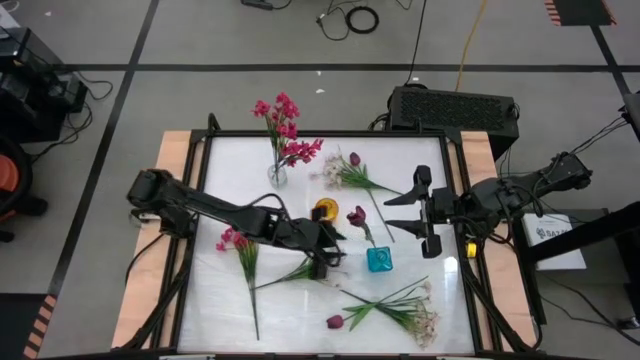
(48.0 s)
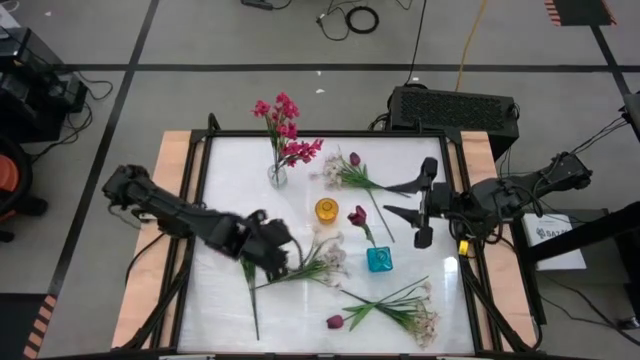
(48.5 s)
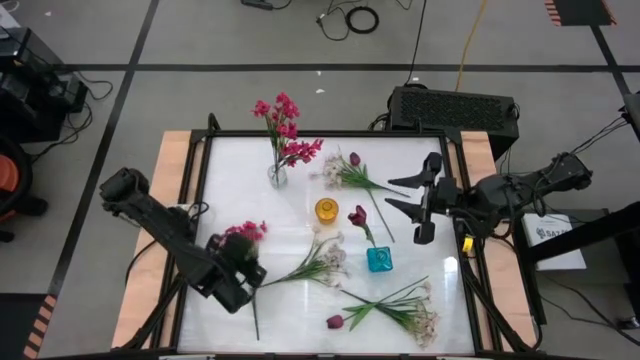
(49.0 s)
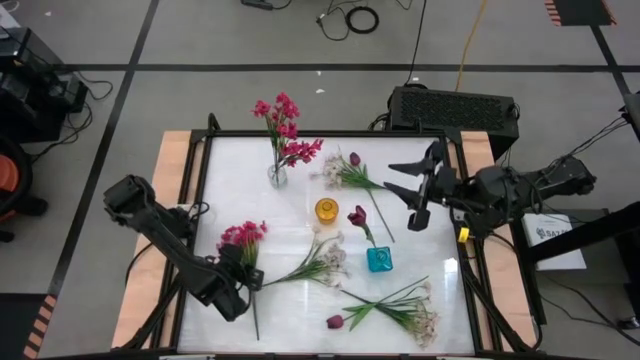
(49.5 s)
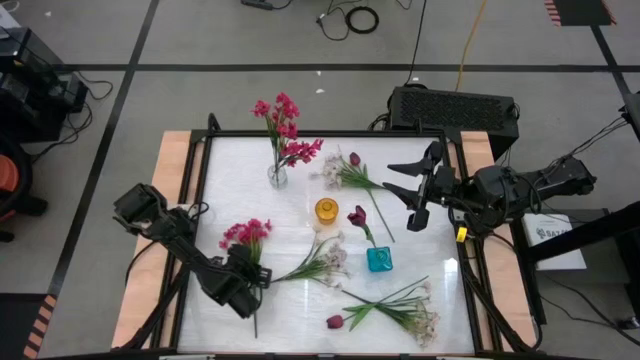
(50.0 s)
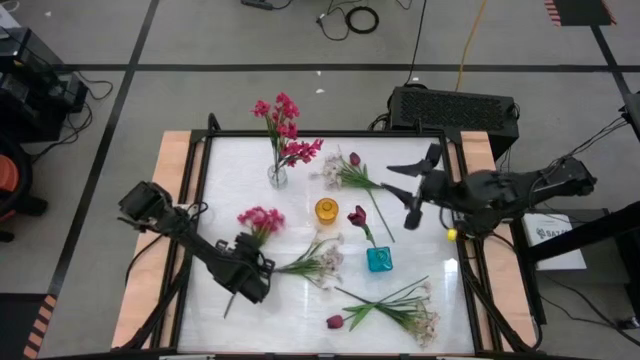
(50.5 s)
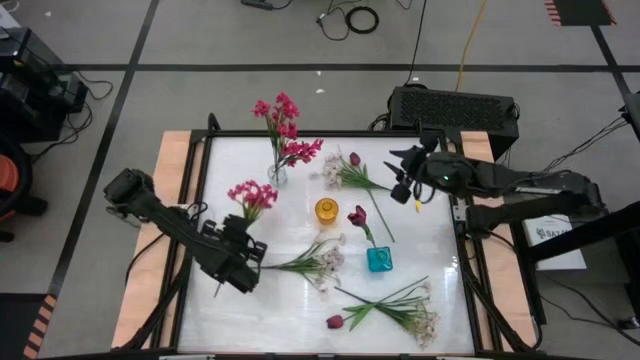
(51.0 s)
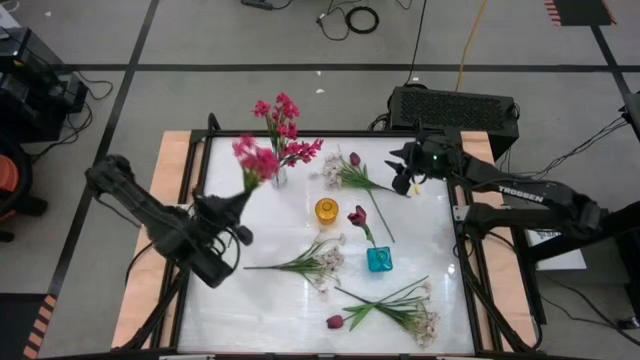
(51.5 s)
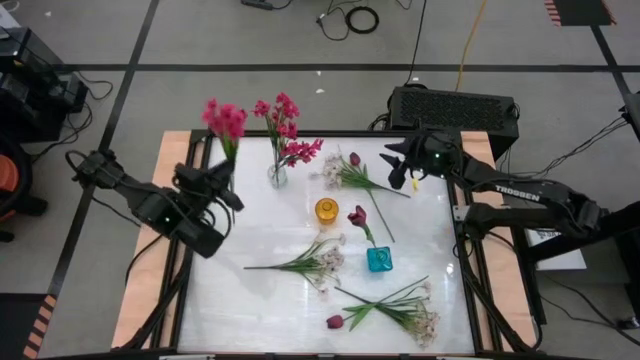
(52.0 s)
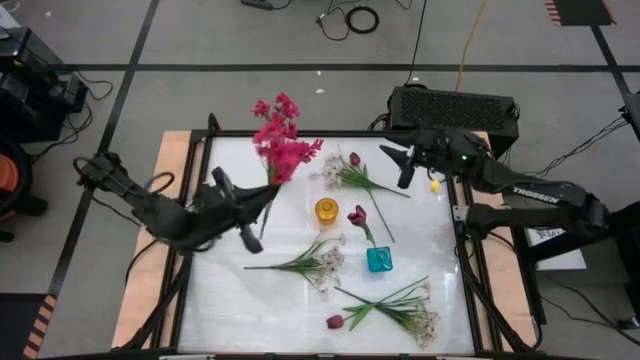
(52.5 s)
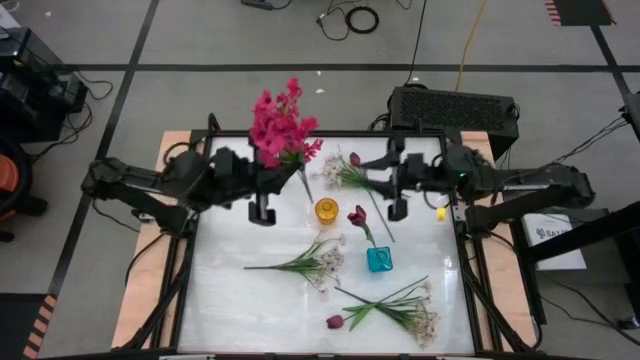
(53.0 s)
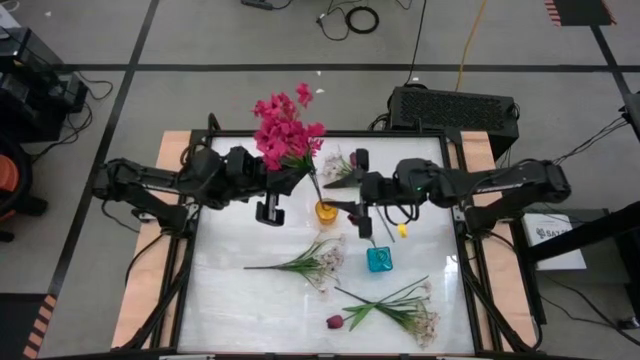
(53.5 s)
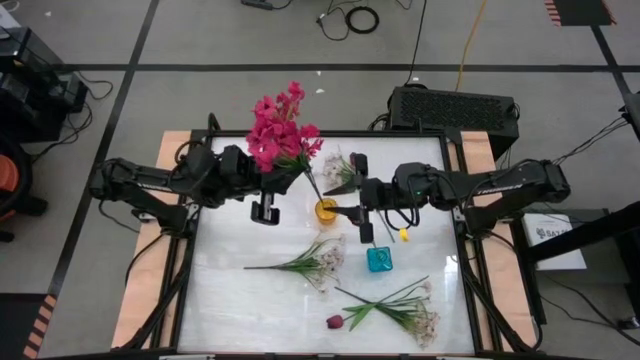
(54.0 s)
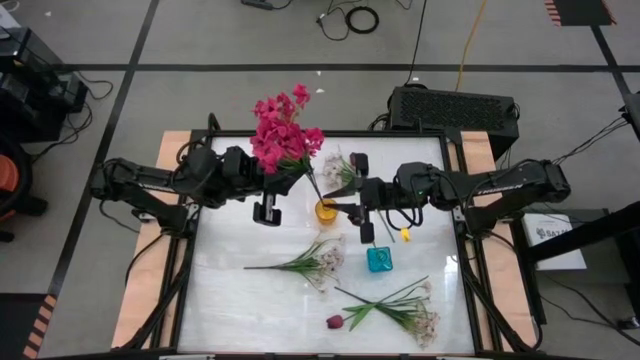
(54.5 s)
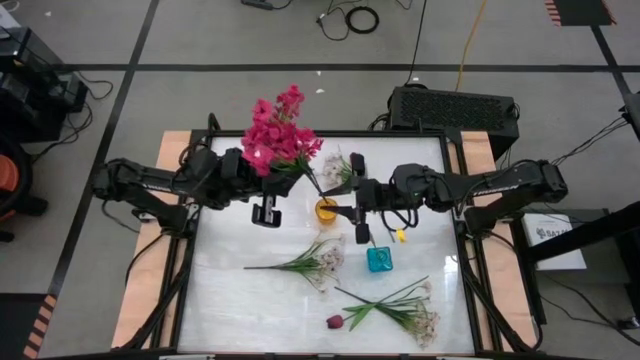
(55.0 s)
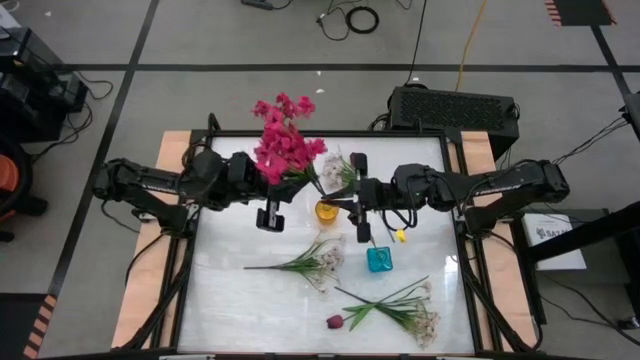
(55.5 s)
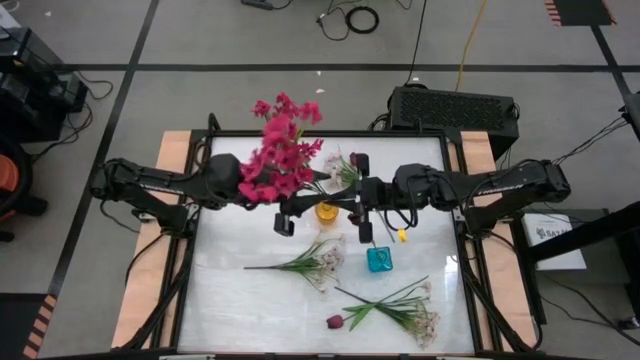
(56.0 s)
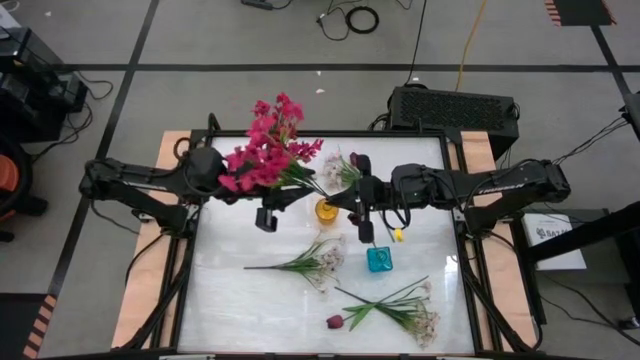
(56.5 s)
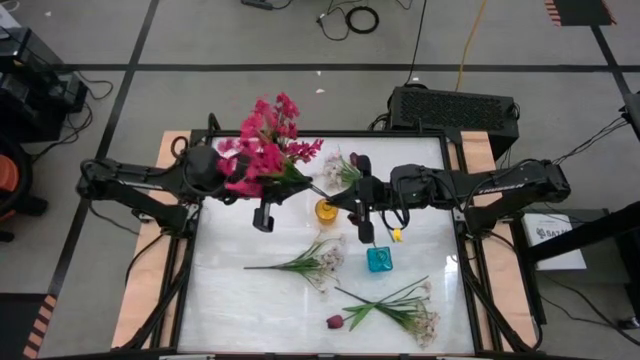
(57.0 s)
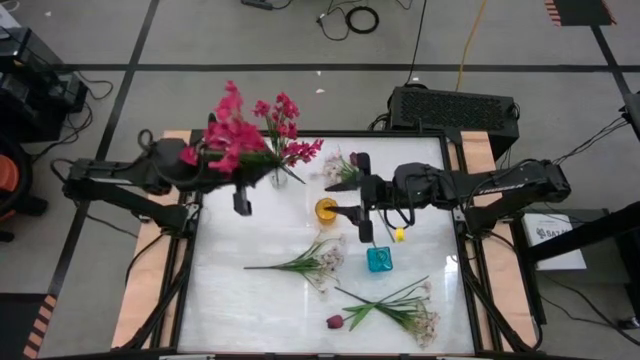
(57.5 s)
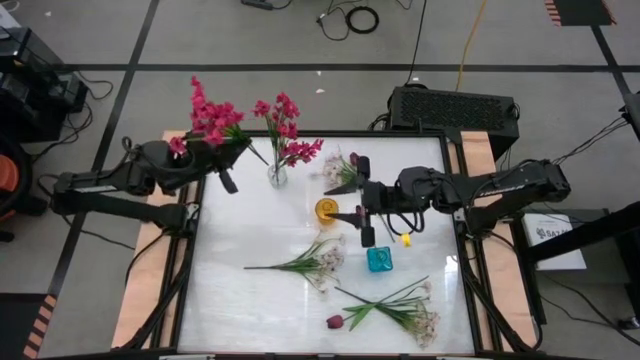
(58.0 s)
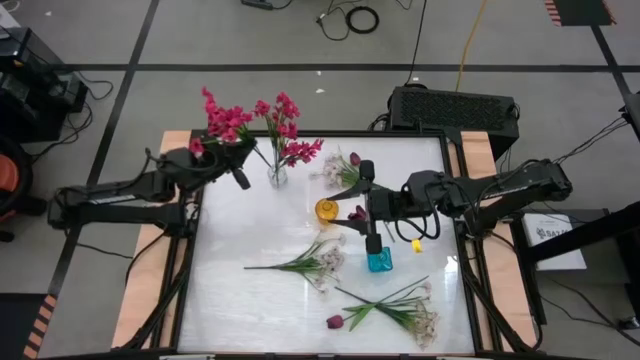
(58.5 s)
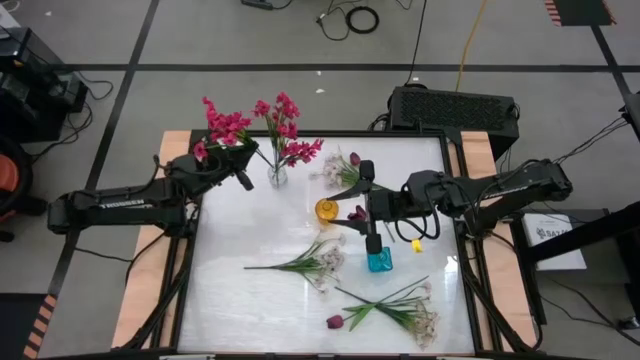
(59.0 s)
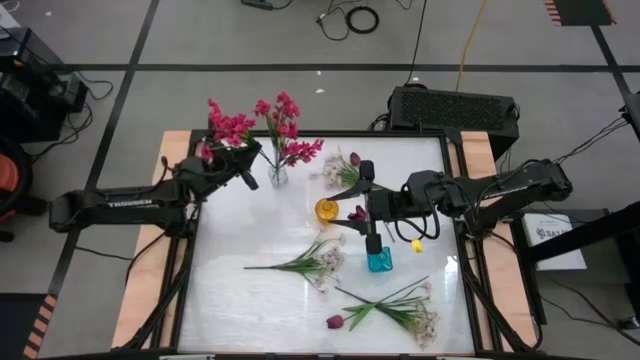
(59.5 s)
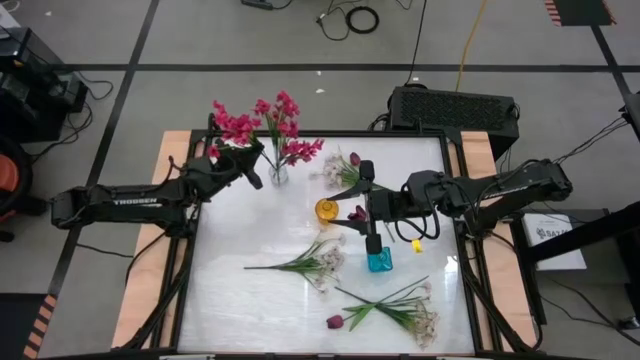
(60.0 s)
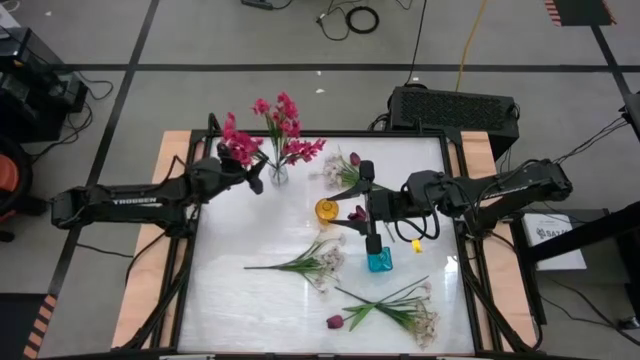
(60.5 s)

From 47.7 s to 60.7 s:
Task: Sort flowers into vase by color
Put the pink flower into the transparent vase

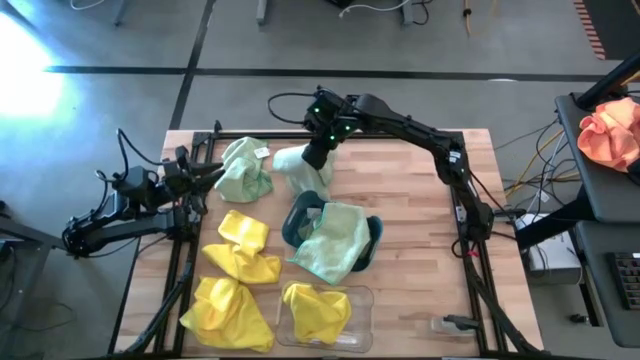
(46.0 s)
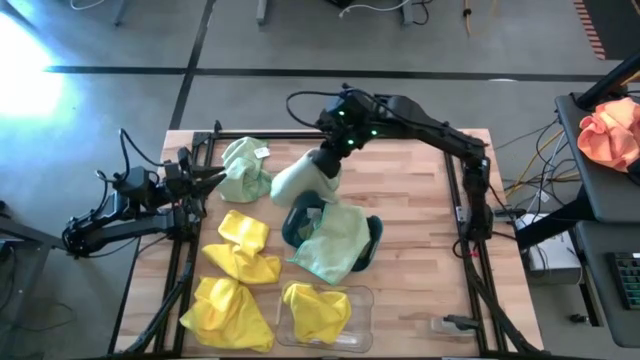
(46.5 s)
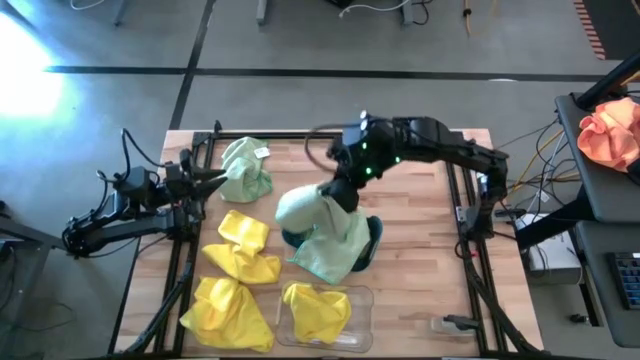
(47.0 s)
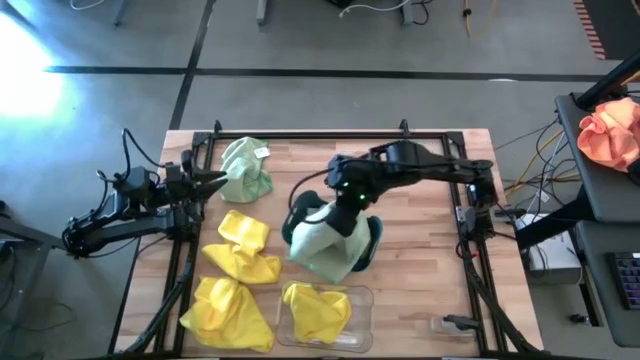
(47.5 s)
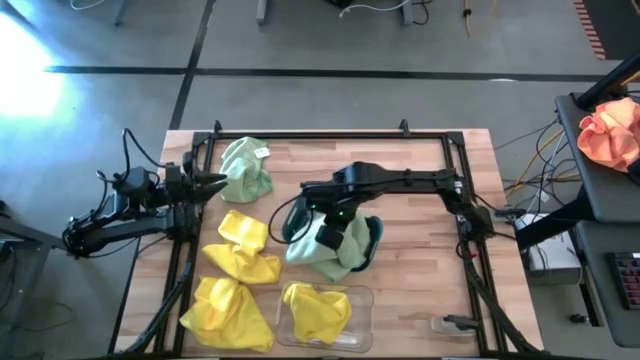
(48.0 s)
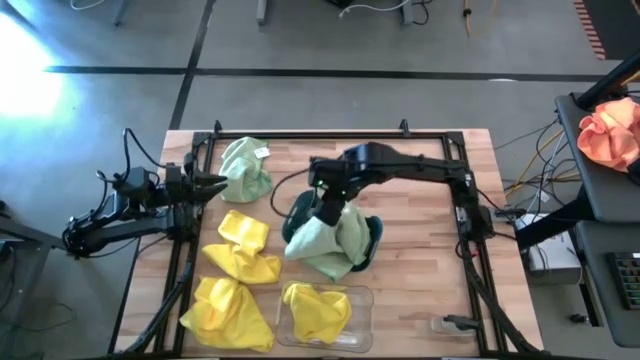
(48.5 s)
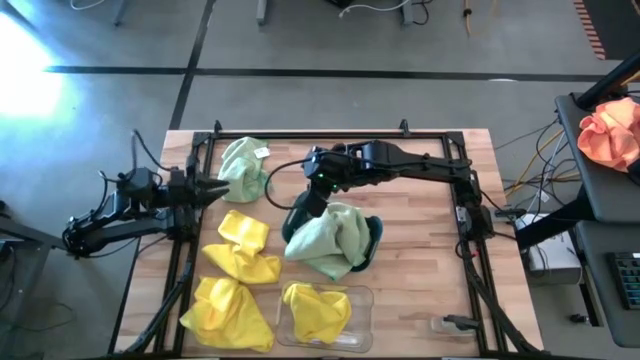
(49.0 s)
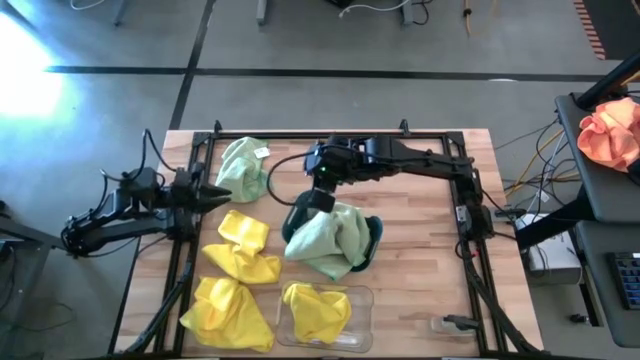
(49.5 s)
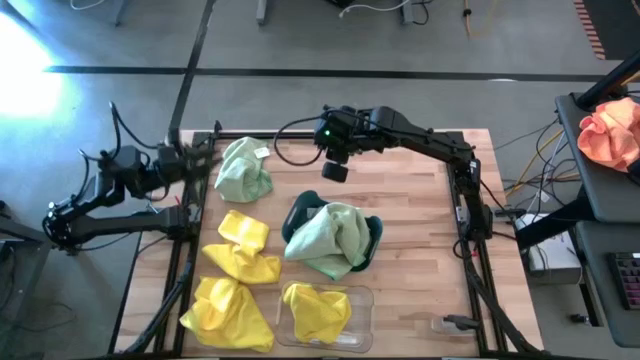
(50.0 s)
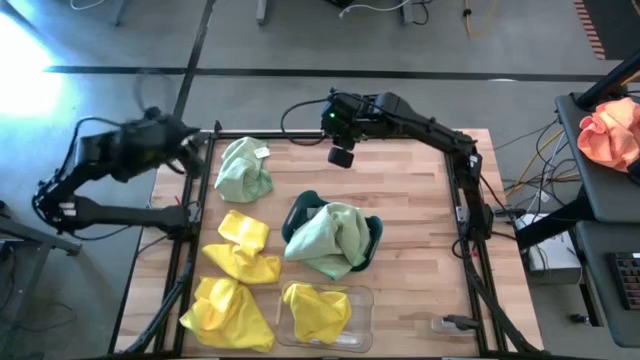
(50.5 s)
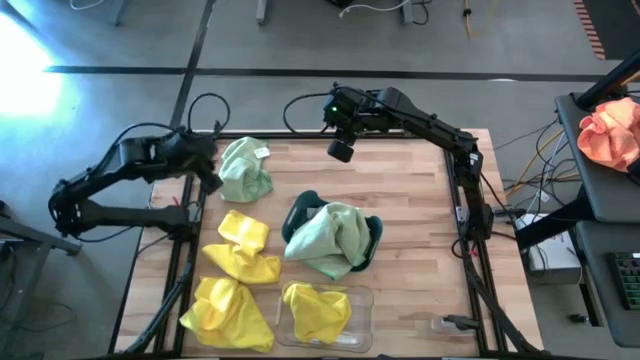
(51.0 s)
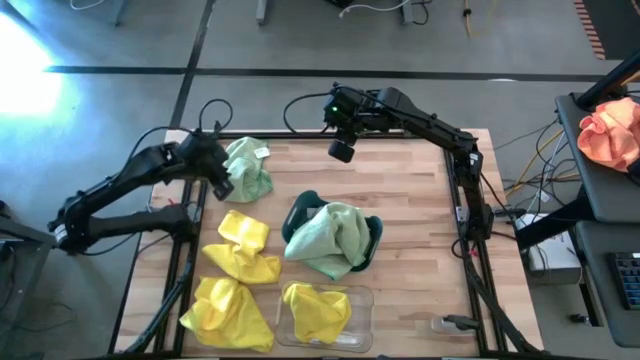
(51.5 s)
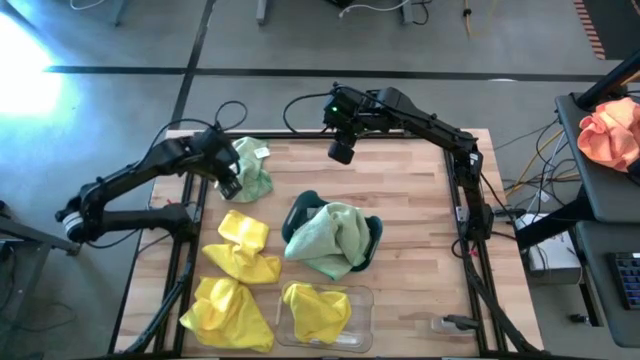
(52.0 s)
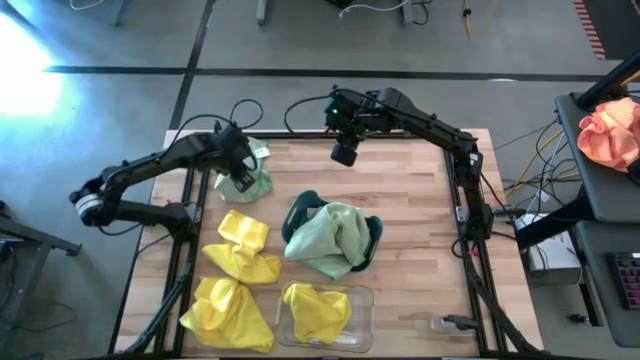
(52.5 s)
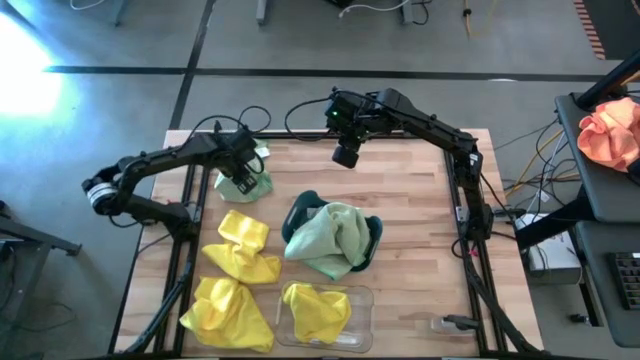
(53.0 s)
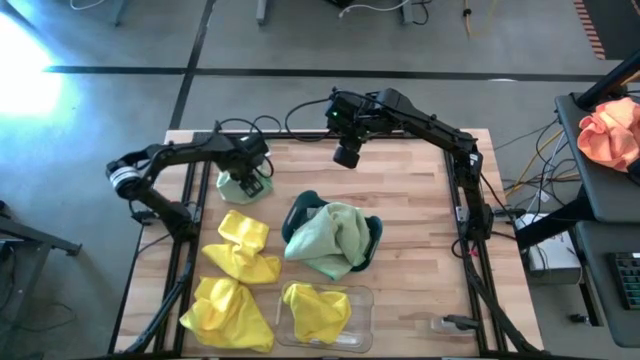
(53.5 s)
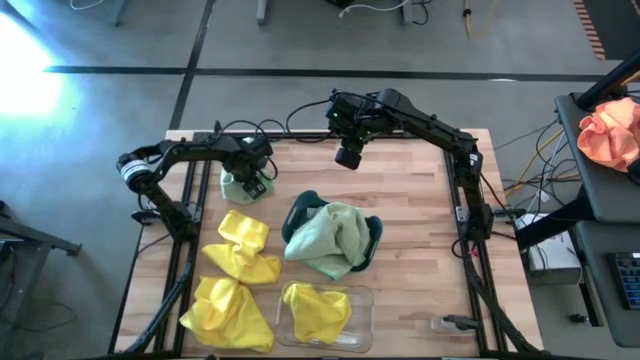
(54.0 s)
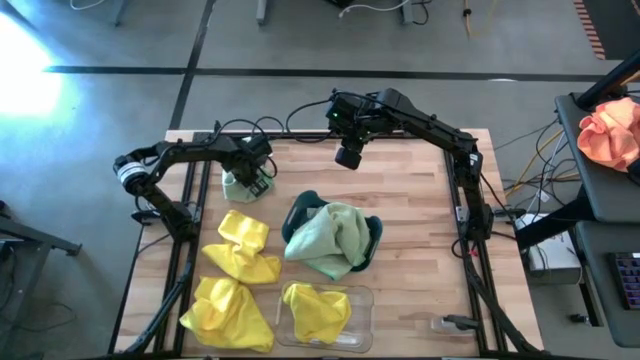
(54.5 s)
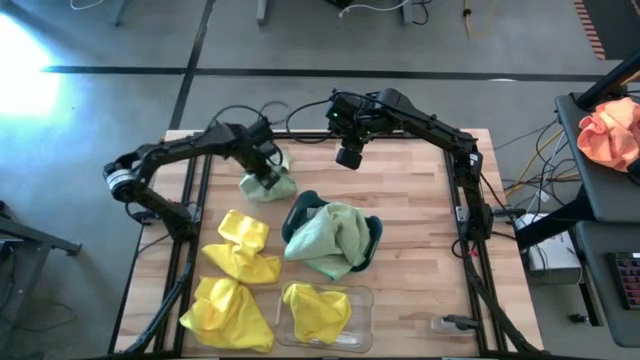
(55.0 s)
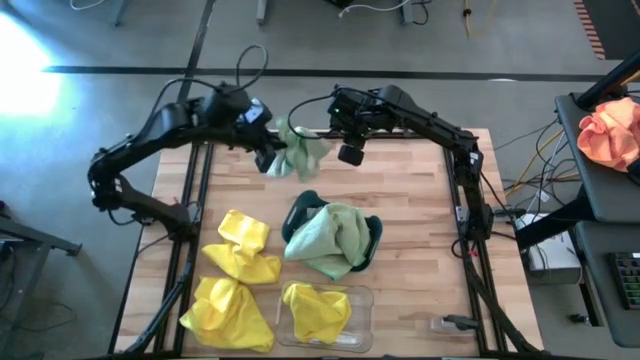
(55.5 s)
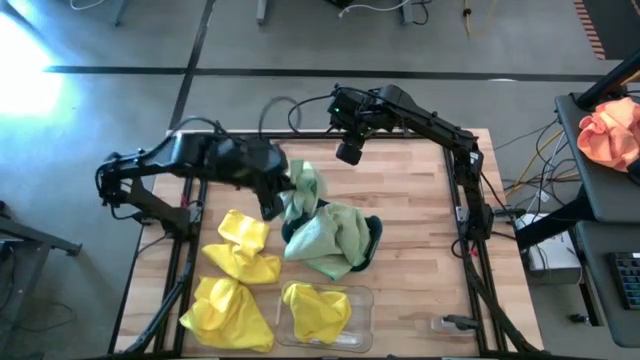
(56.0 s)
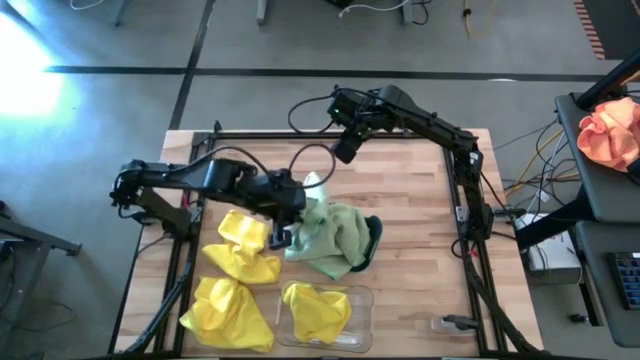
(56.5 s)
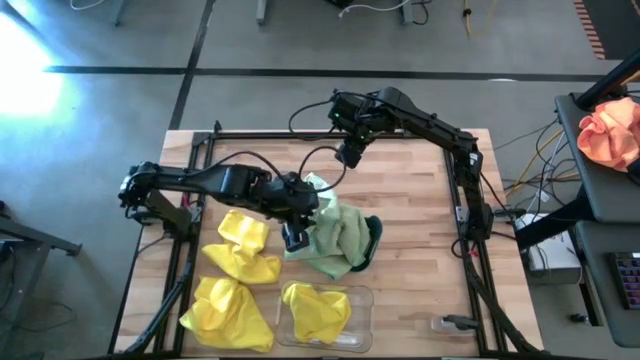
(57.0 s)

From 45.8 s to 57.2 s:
Task: Sort microfiber towel by color & place in baskets
Put the green microfiber cloth into the blue bin
